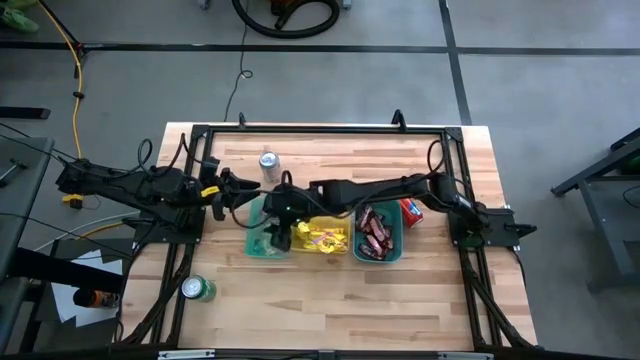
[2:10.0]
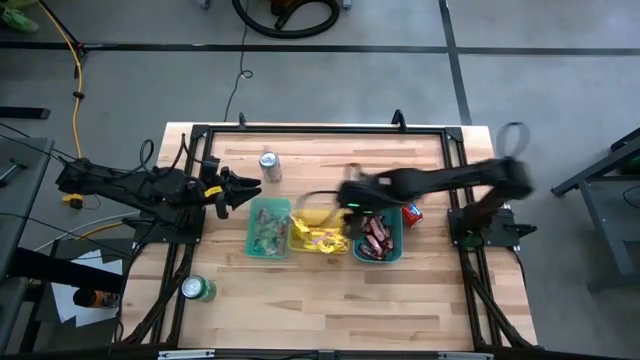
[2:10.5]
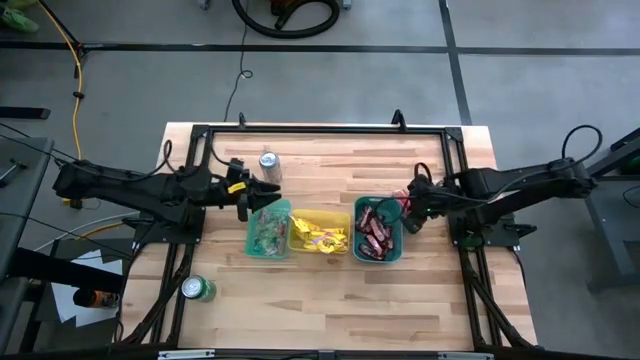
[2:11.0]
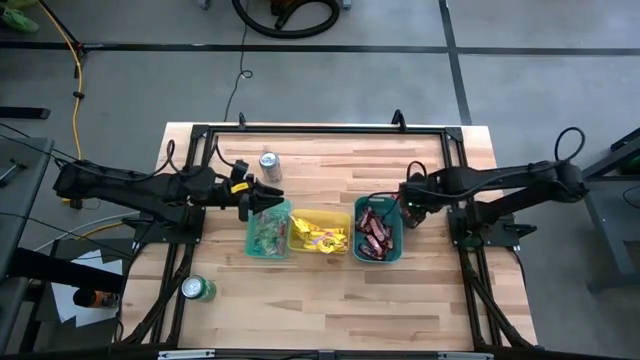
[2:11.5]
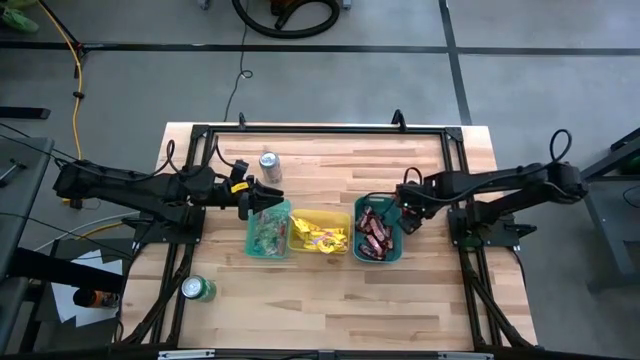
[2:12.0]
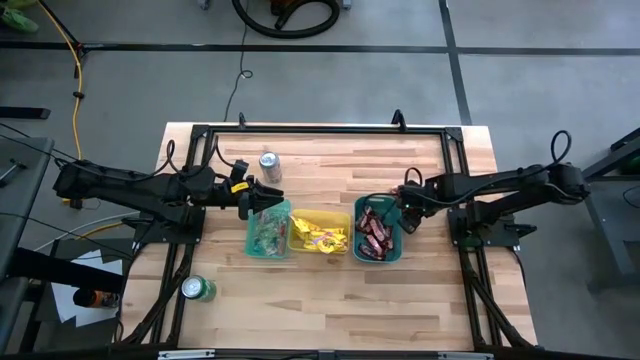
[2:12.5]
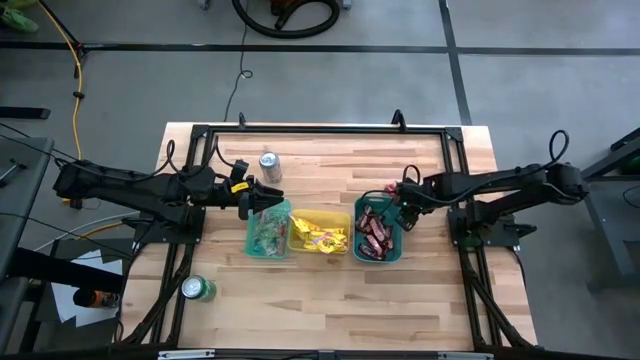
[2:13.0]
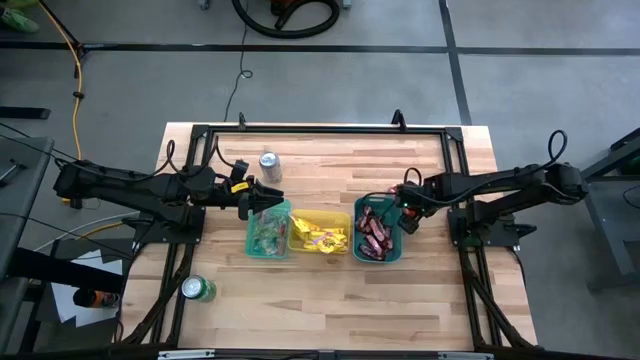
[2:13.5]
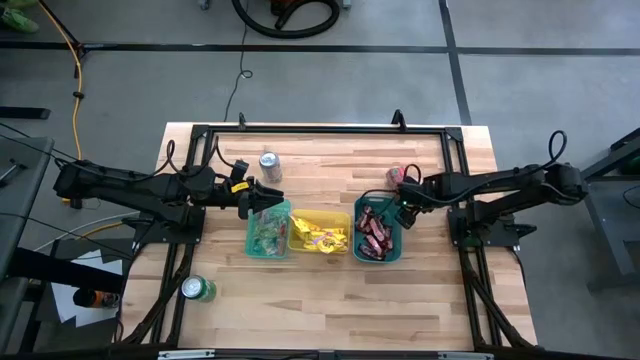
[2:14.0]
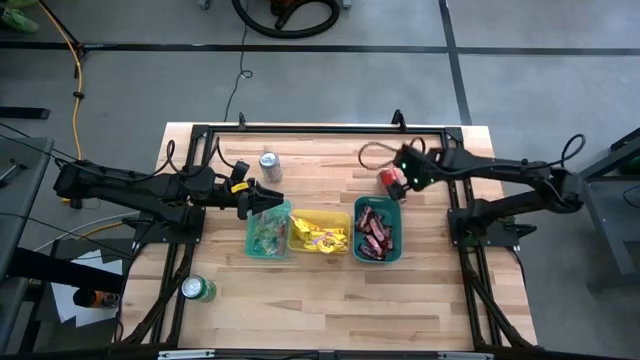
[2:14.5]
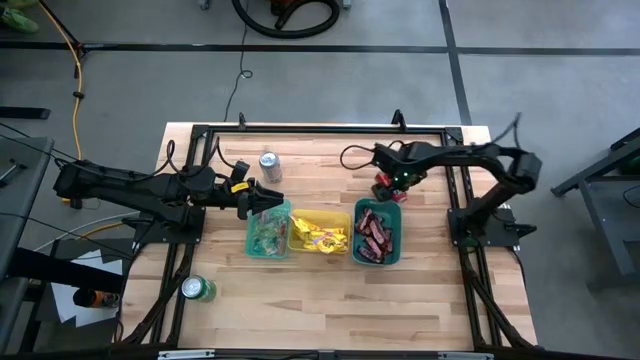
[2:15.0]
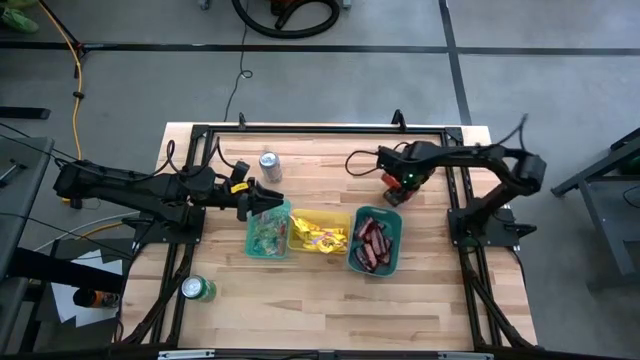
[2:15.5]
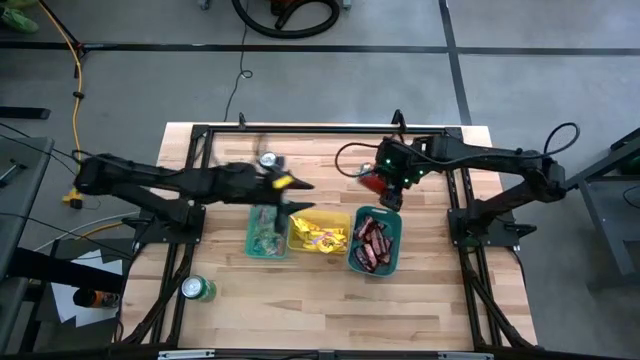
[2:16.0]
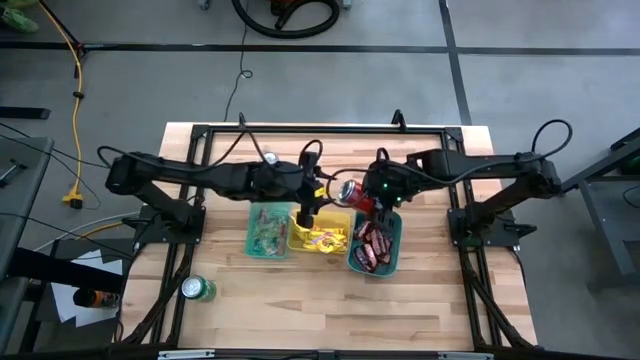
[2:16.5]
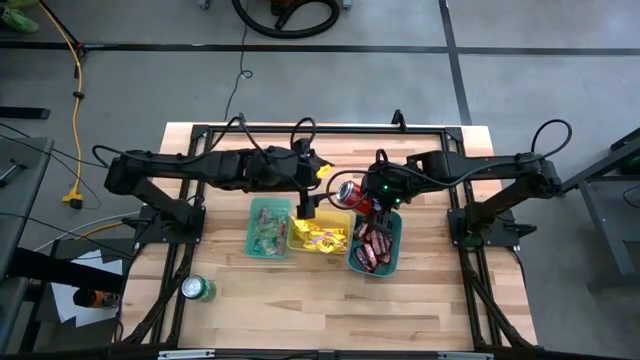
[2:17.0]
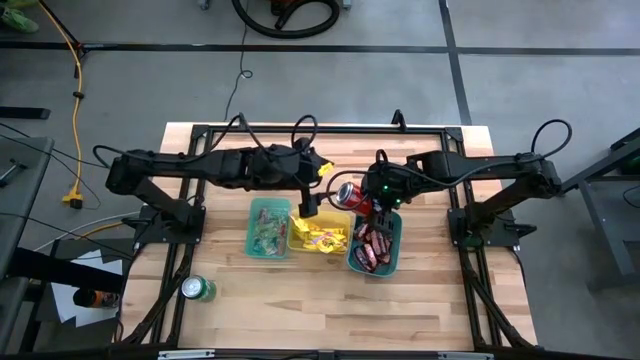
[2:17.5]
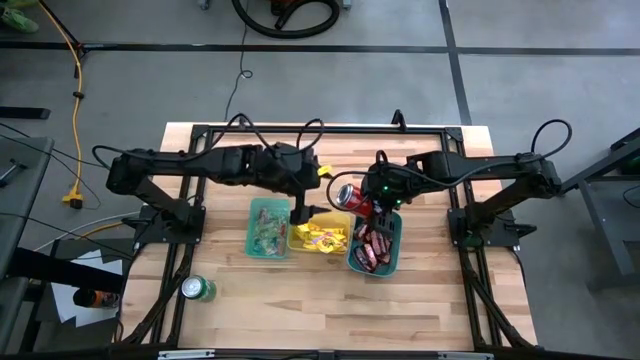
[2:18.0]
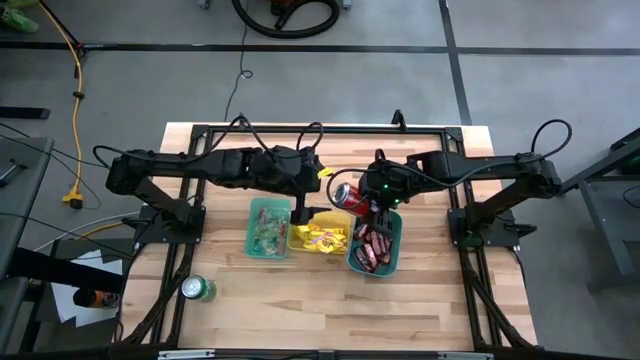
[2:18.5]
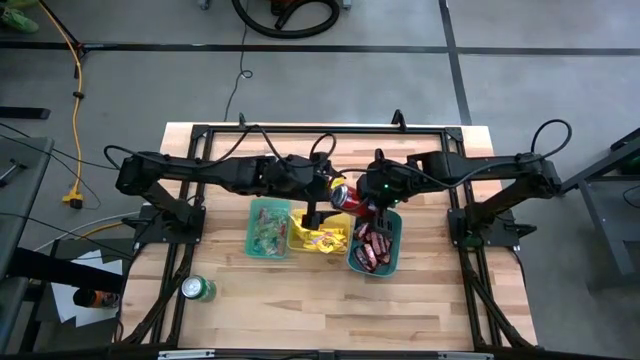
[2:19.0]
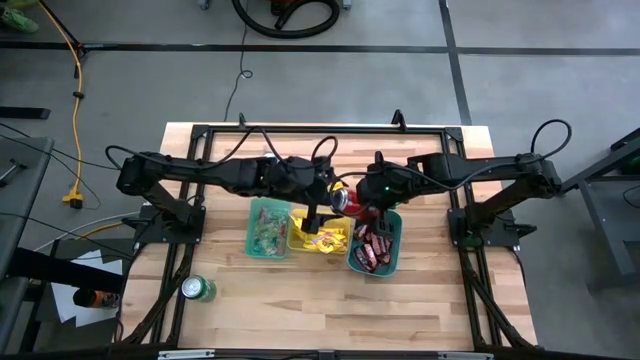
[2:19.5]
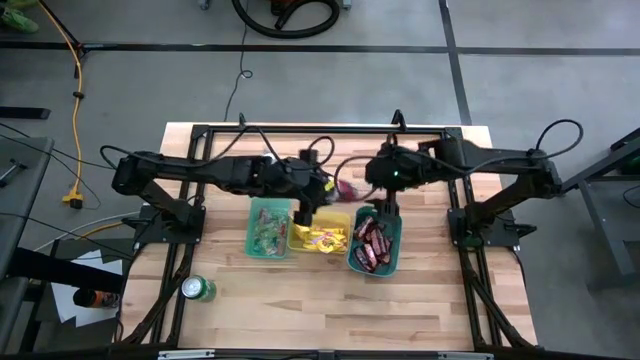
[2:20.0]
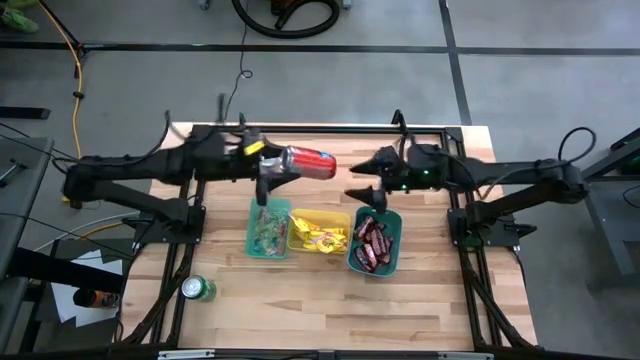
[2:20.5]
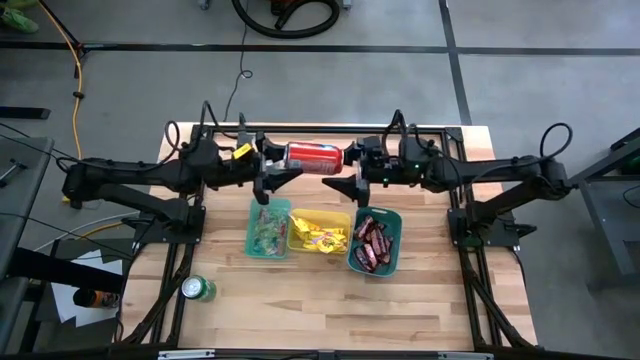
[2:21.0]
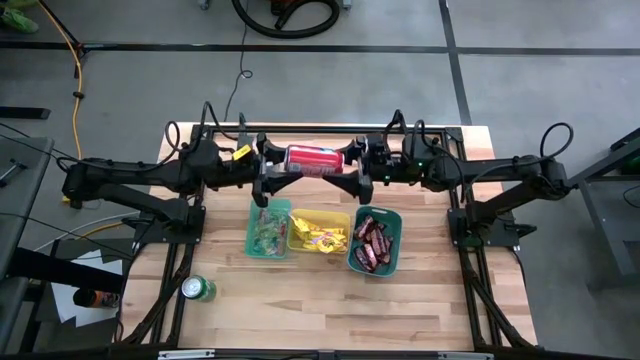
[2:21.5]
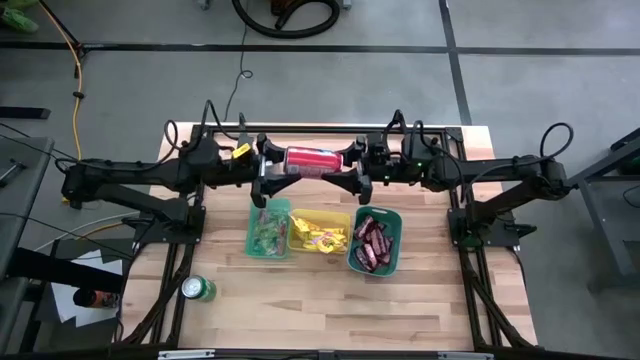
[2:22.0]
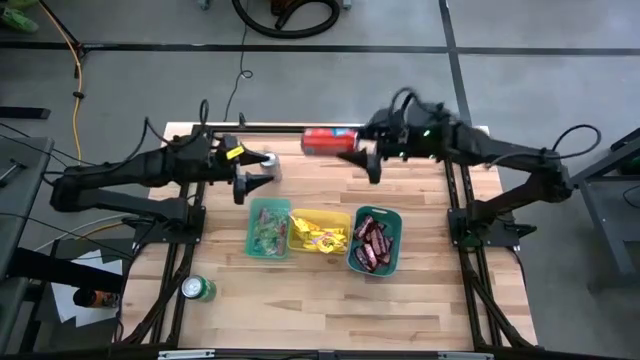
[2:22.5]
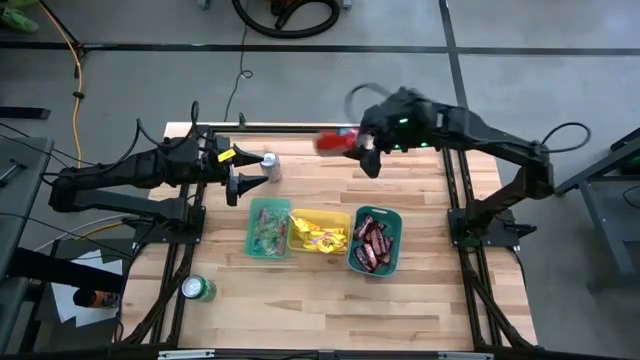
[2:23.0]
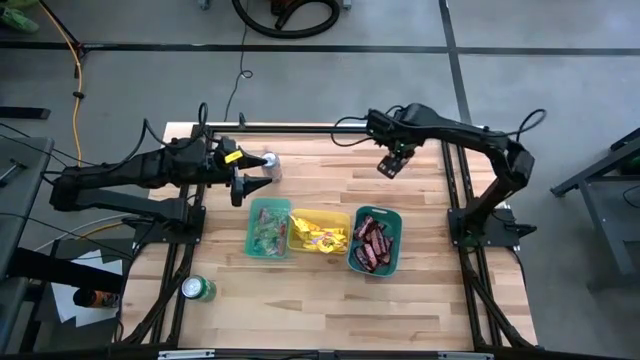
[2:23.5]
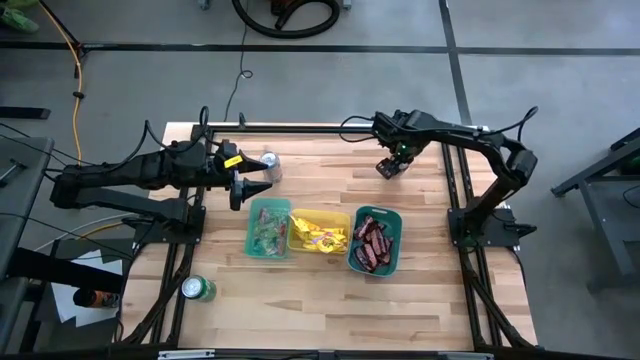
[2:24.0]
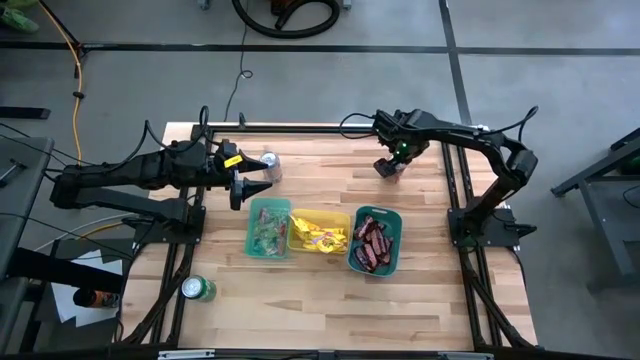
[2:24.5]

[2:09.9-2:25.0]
Task: Sort candy
Adjust the red soda can

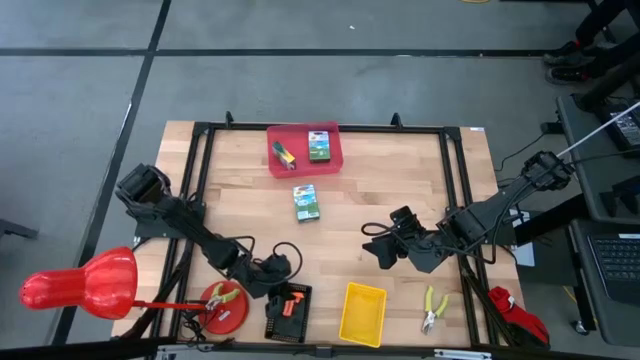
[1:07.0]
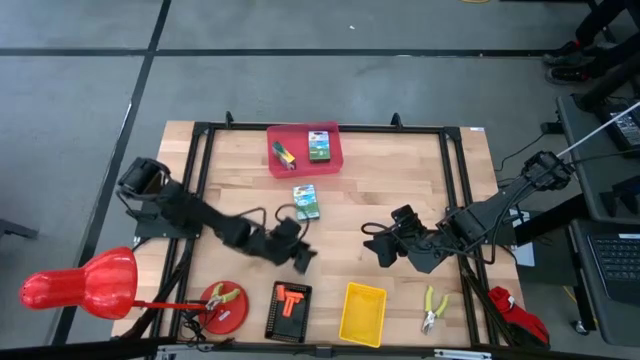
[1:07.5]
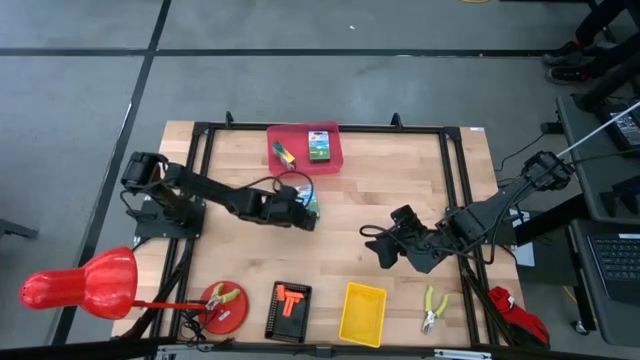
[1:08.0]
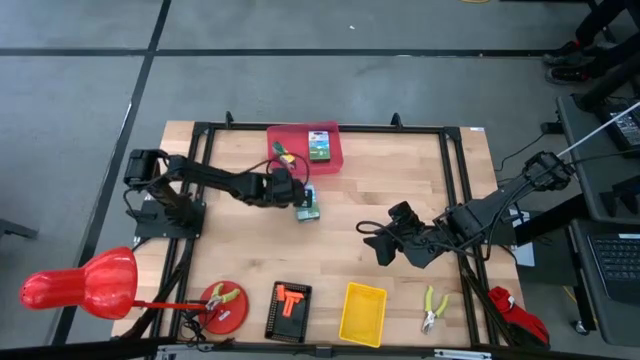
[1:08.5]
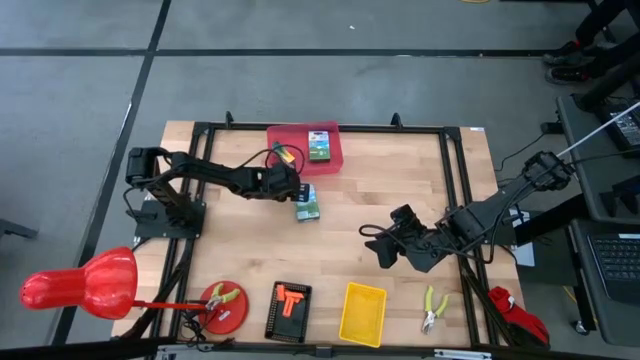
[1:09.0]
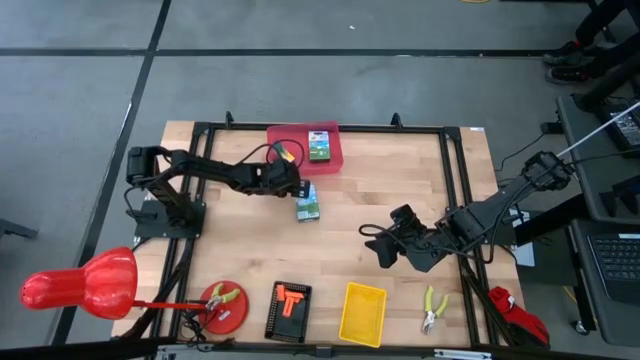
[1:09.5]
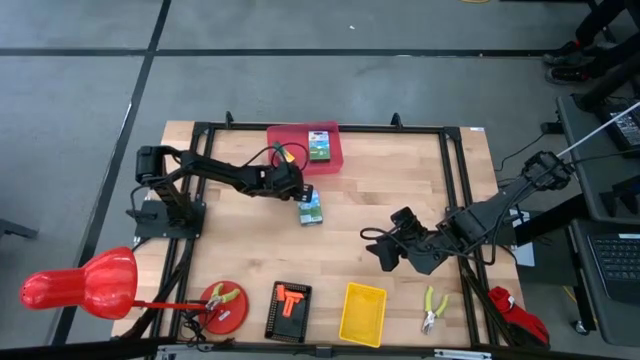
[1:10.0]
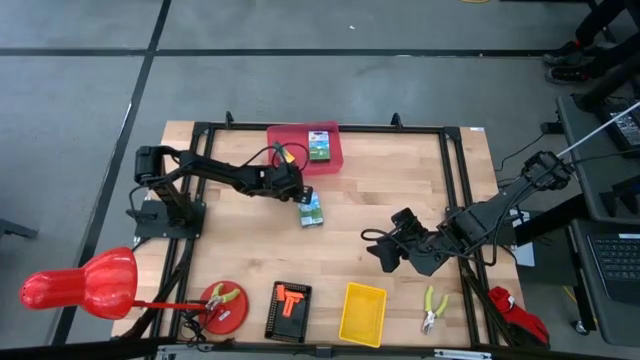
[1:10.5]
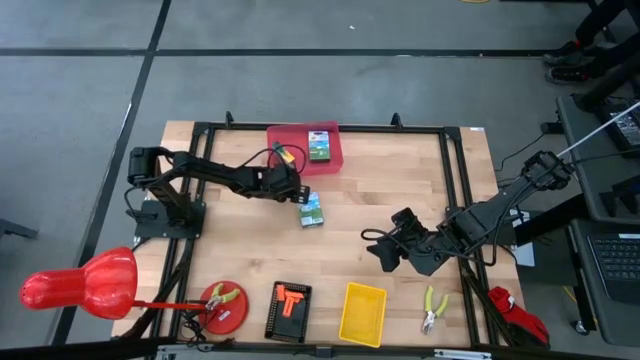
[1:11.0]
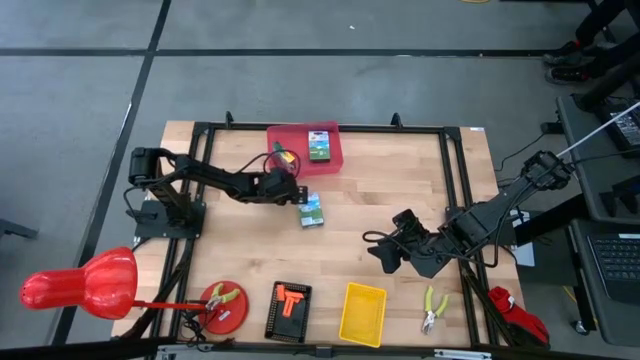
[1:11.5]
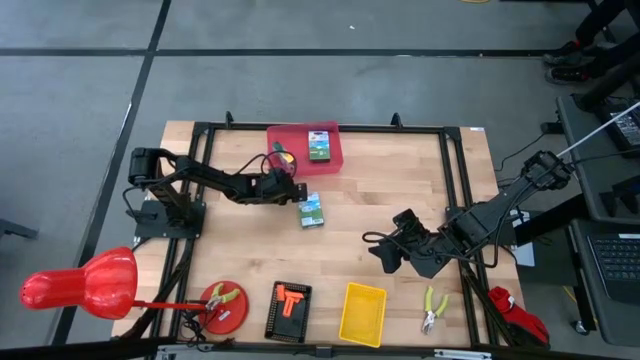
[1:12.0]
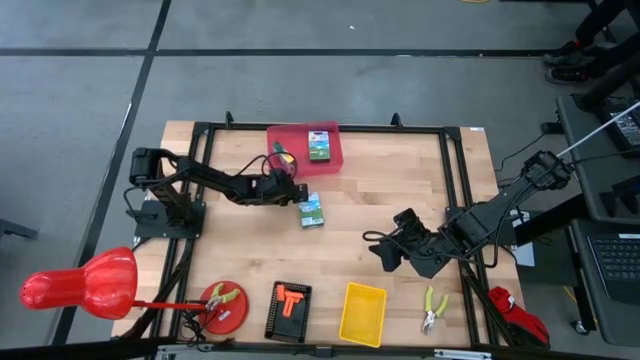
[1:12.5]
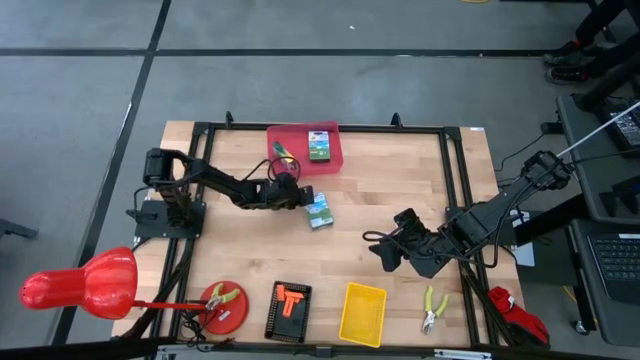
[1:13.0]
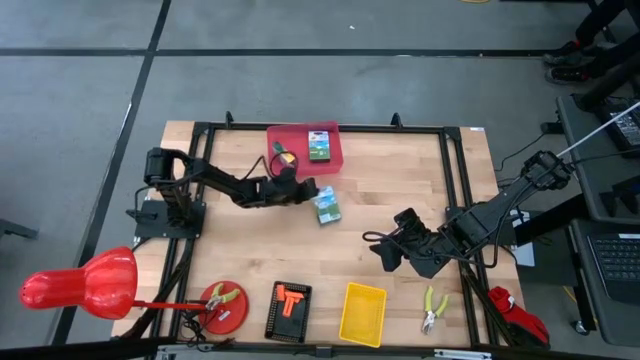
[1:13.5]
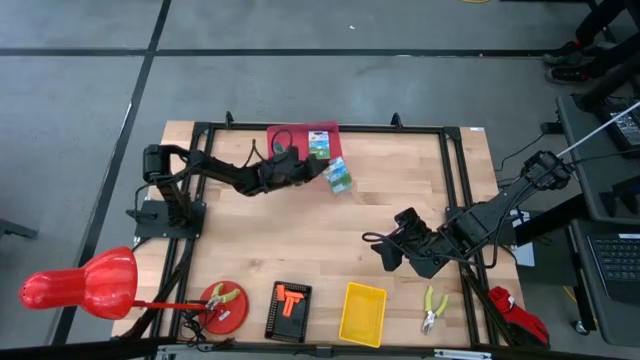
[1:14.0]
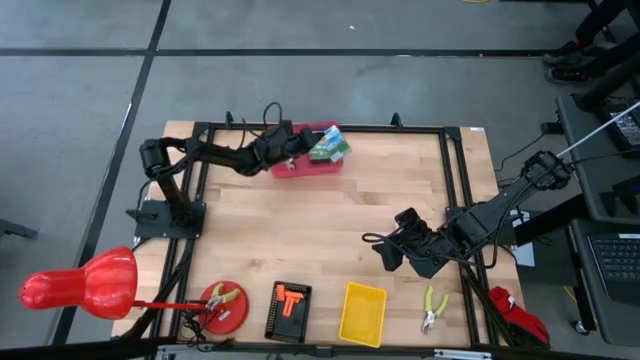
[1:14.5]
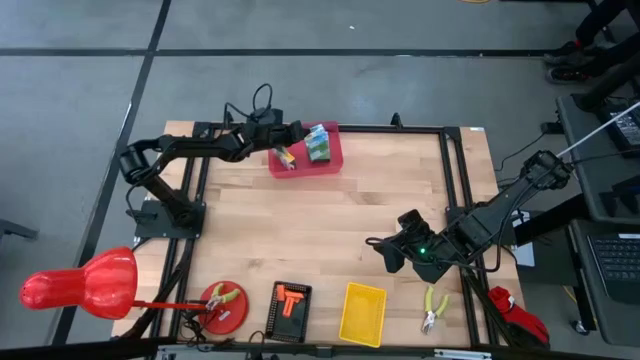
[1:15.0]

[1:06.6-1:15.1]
Task: Pick & Place School Supplies
Put the yellow crayon box into the red bin
